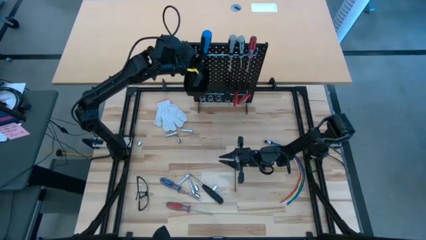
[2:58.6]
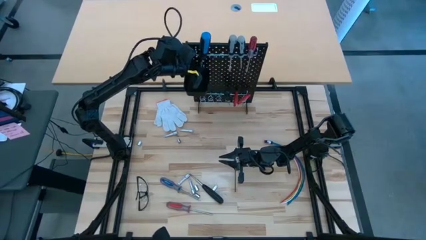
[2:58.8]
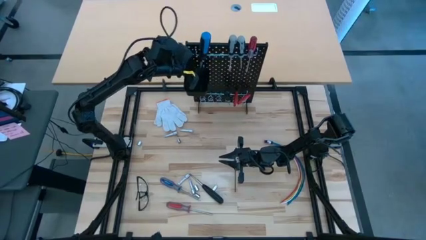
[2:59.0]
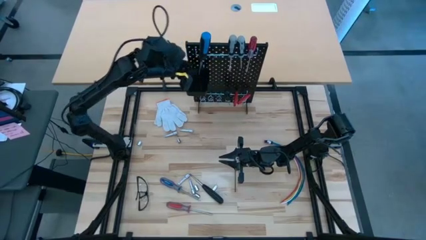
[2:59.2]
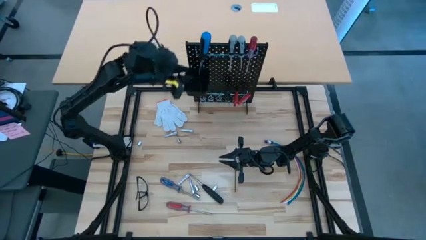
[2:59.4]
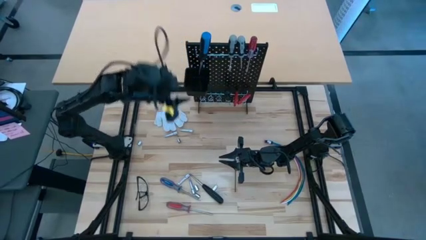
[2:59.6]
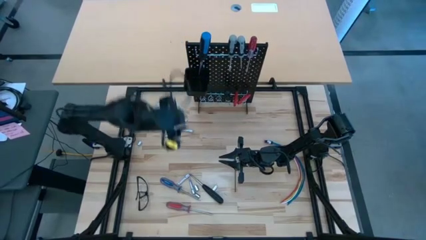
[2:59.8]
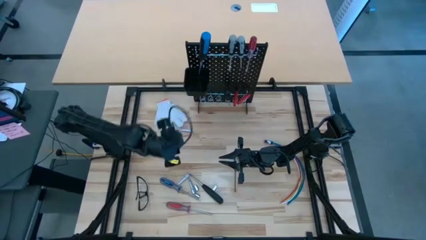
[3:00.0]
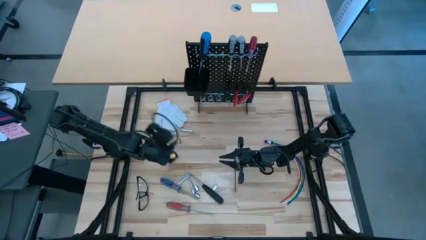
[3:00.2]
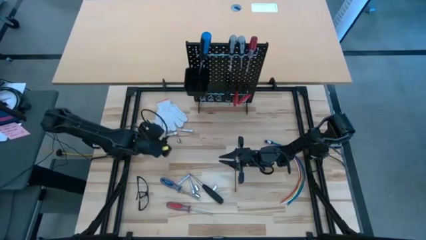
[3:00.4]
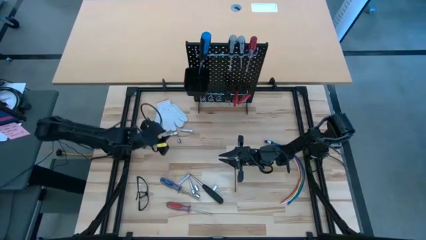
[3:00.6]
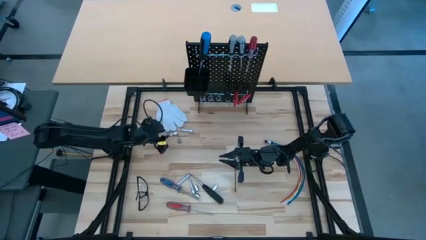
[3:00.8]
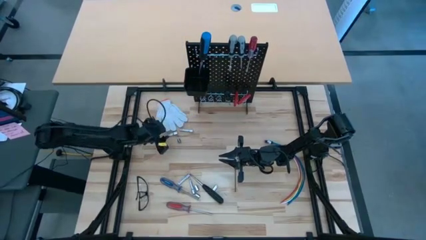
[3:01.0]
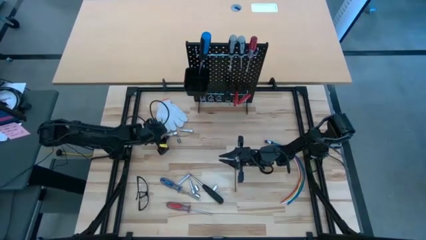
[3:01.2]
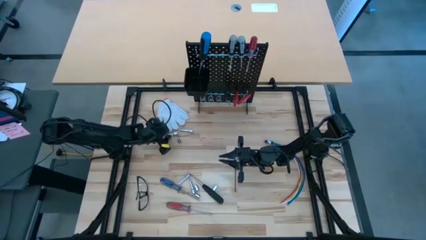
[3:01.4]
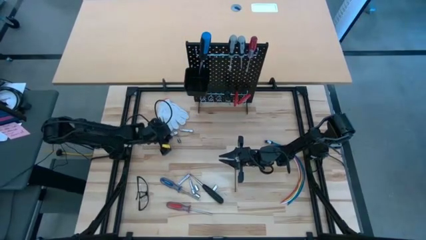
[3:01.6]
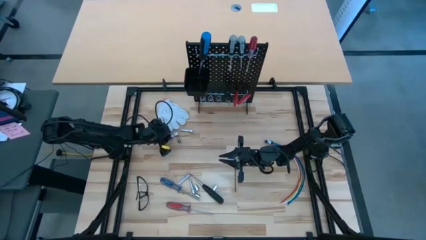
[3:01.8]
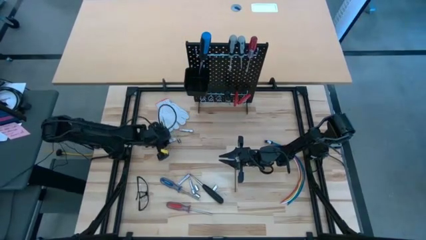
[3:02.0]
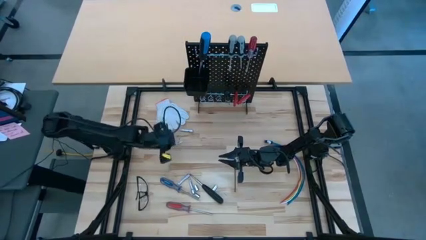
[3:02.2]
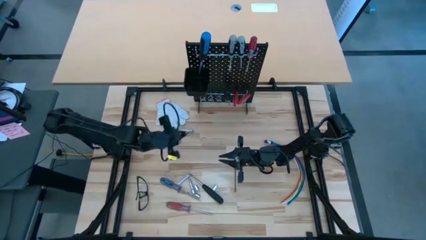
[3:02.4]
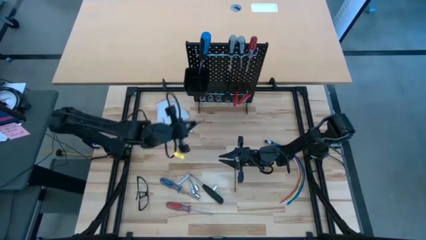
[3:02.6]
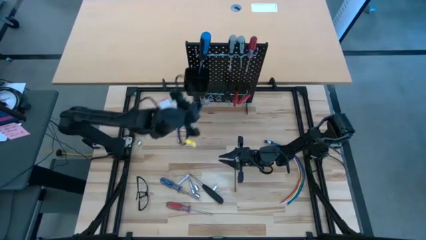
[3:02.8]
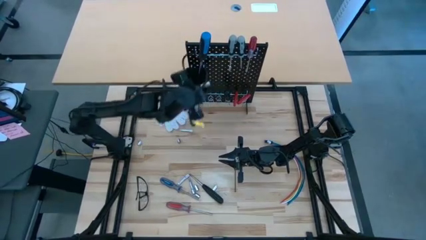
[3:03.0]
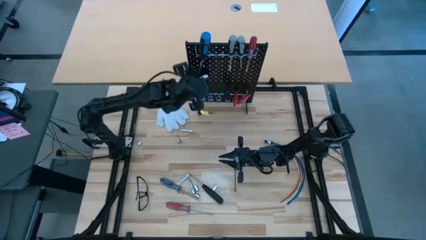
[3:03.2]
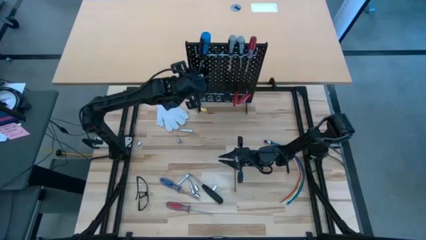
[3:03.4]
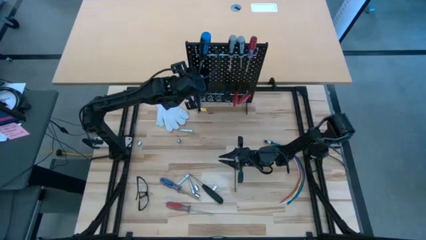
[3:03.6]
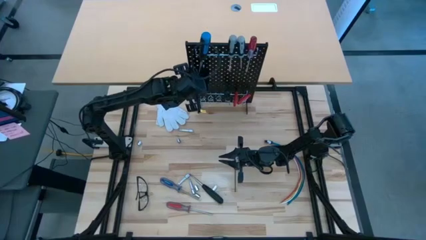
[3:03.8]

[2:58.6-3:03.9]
Task: Hang tools onto peg board
Put the extension bar in the pegboard bin

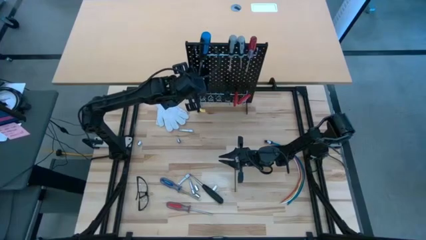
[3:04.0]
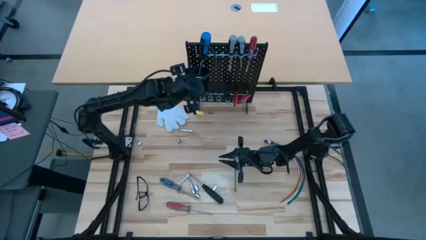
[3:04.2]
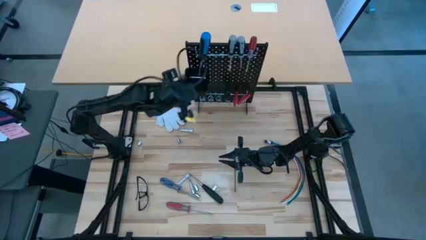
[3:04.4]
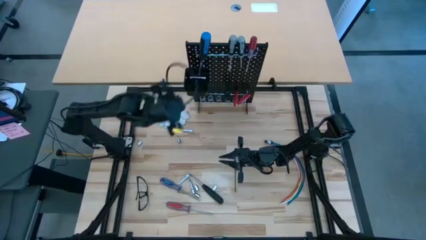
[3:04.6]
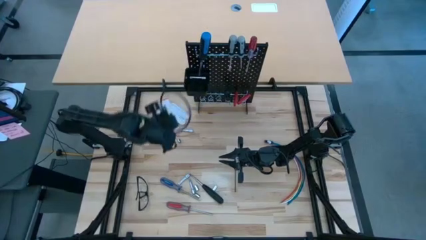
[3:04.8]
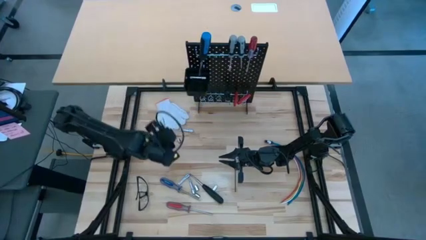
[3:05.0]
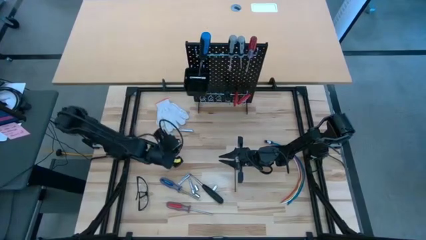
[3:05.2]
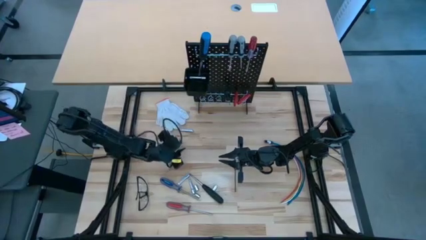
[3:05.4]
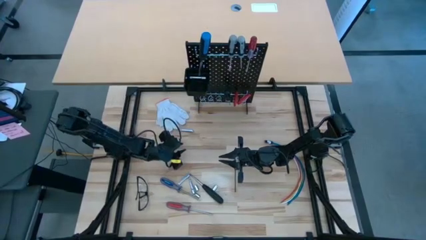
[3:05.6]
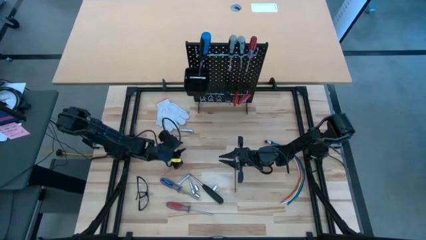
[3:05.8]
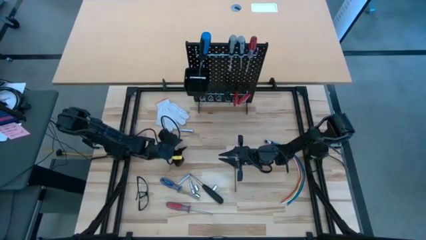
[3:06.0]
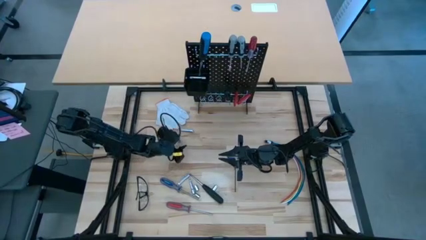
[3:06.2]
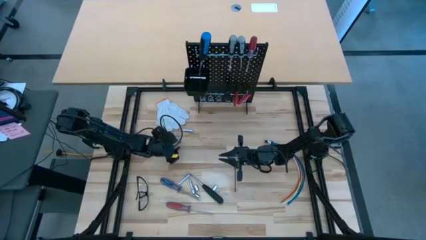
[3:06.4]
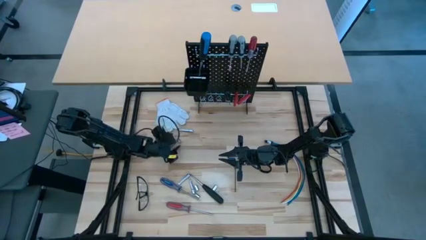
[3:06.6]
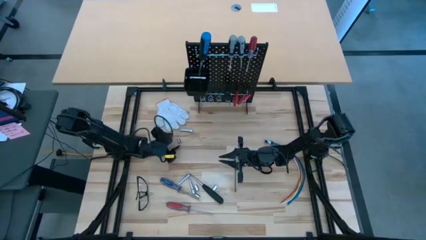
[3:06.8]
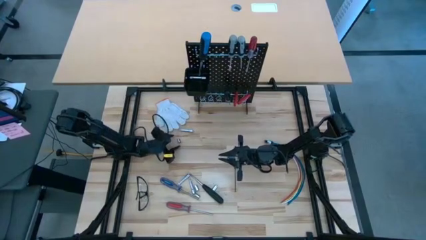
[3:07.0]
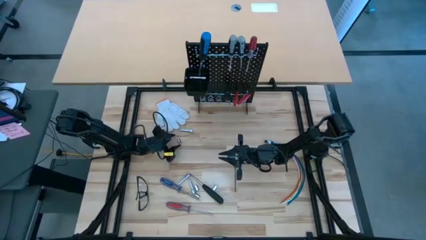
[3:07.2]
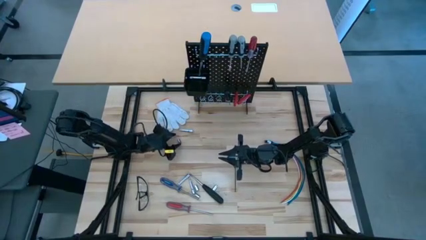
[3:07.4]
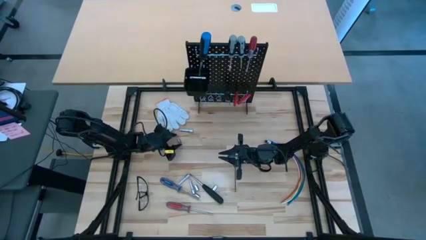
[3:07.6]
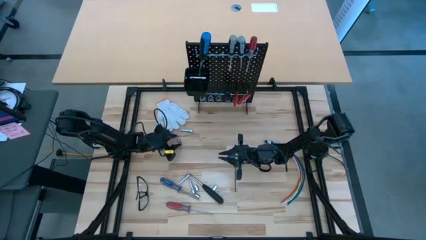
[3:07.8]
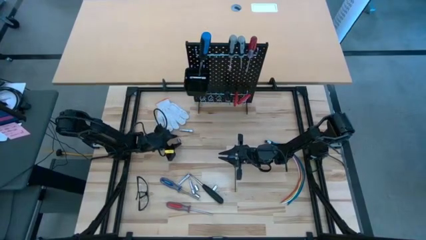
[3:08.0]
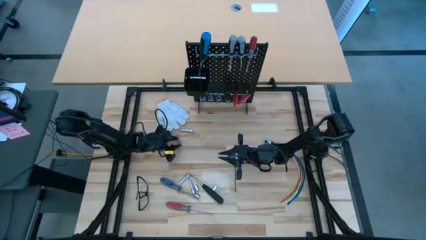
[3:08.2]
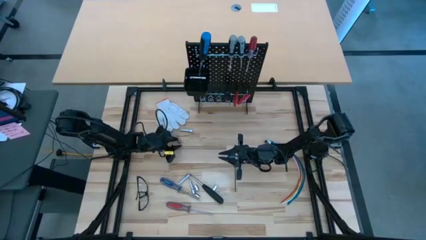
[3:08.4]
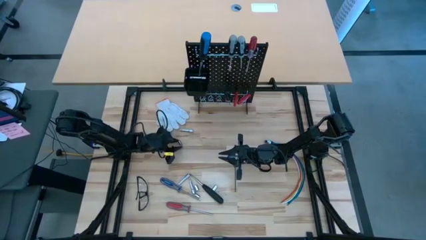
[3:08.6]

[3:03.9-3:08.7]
Put the socket in the pegboard bin

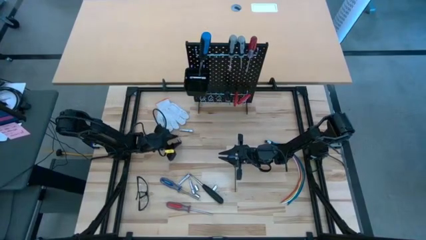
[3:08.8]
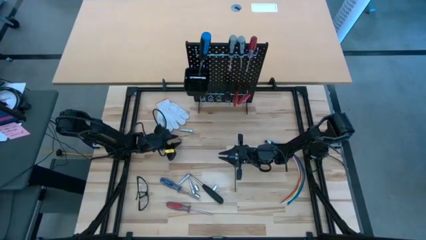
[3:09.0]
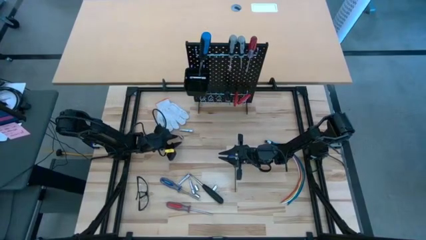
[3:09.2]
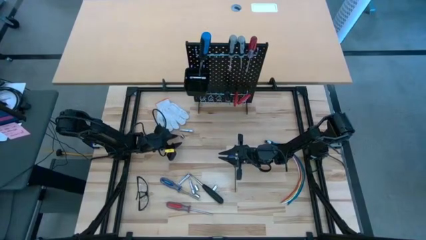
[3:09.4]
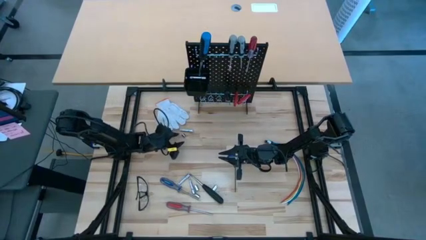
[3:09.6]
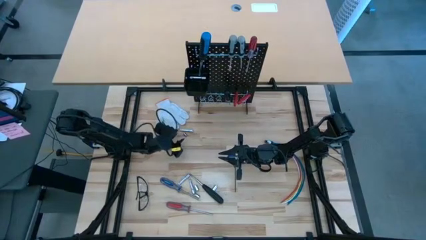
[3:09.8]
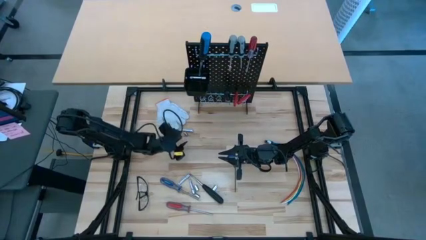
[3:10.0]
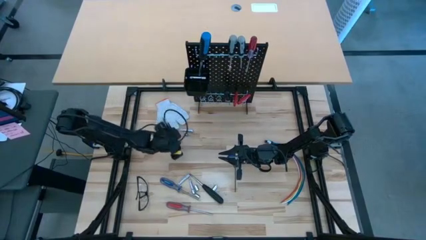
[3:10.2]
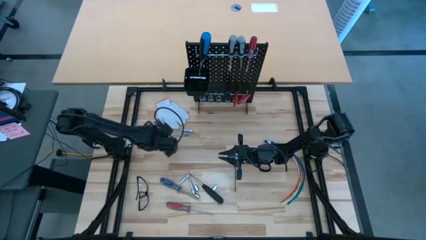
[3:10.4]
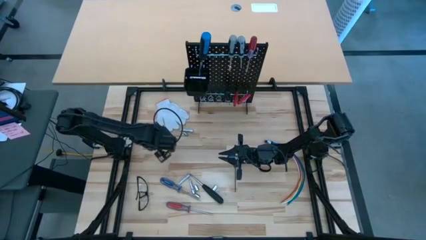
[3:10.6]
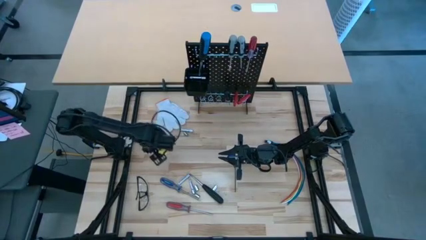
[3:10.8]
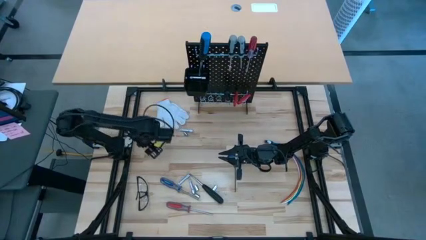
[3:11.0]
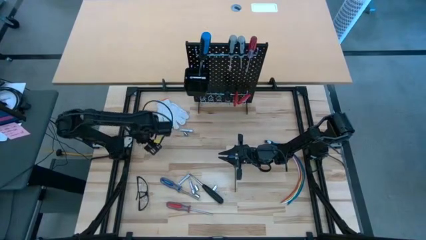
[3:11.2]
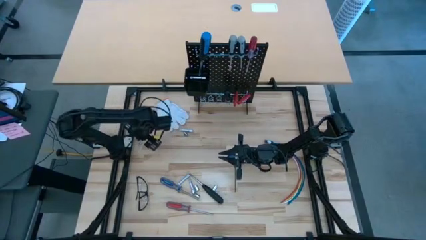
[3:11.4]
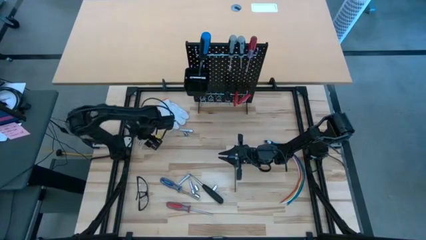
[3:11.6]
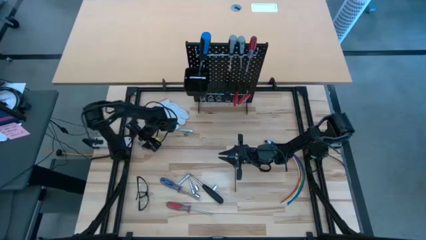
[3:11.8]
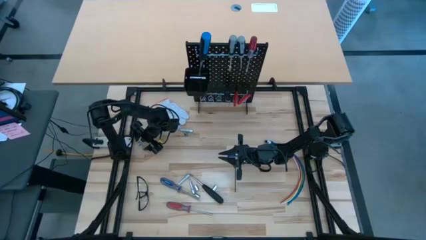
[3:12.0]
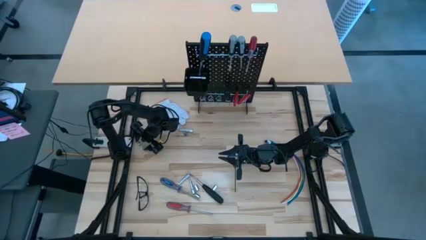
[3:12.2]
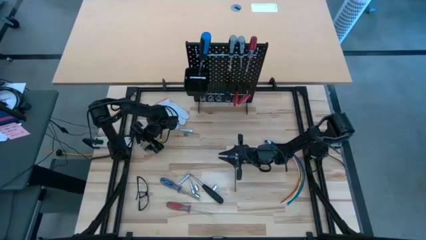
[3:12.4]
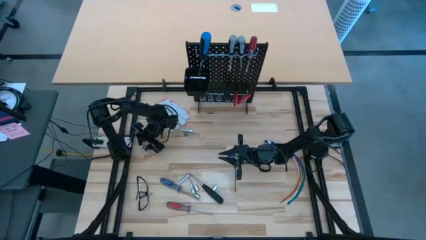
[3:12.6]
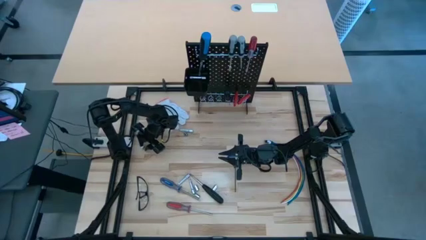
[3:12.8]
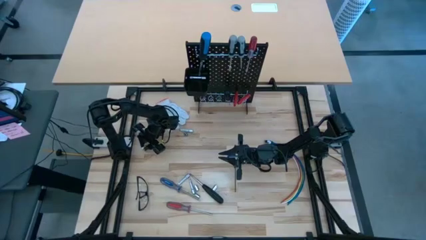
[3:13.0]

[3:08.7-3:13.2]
Put the socket wrench in the pegboard bin

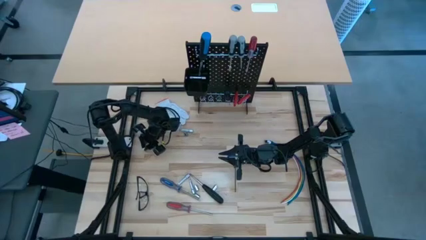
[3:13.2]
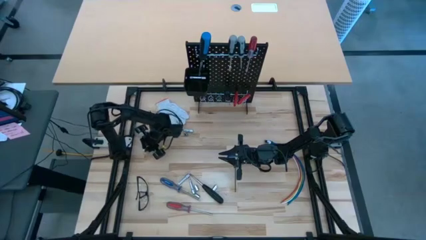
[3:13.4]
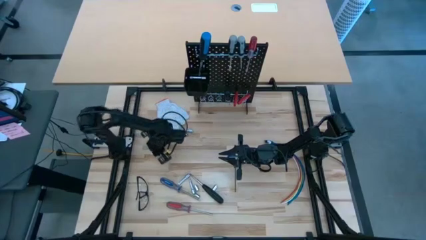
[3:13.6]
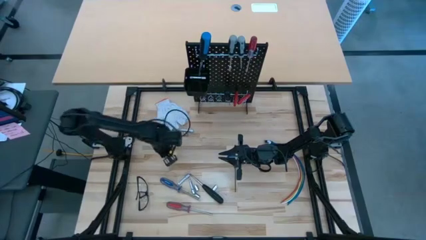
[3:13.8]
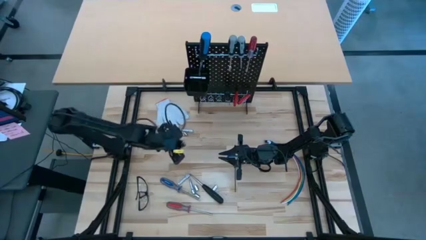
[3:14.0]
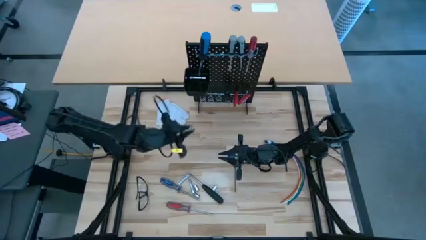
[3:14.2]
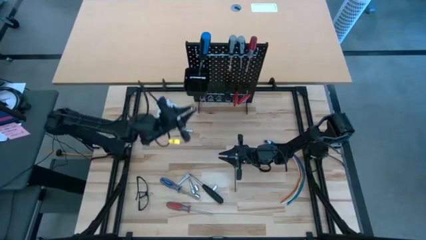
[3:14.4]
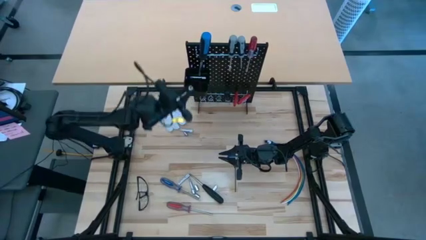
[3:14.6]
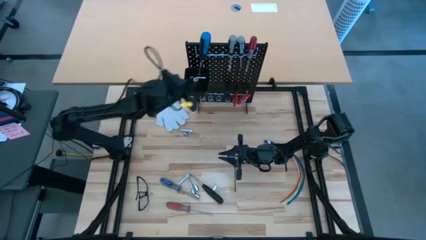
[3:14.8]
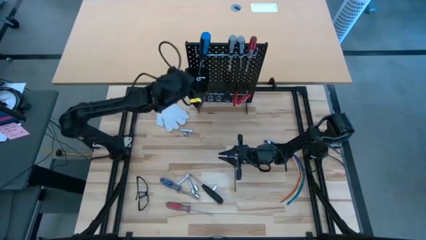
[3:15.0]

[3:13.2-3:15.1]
Put the extension bar in the pegboard bin
